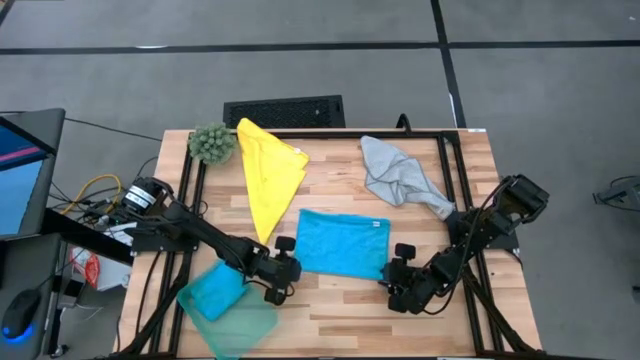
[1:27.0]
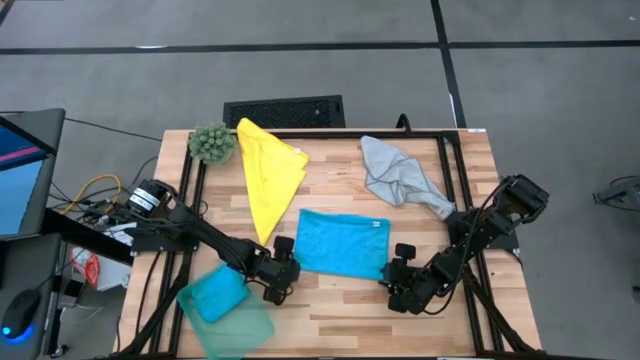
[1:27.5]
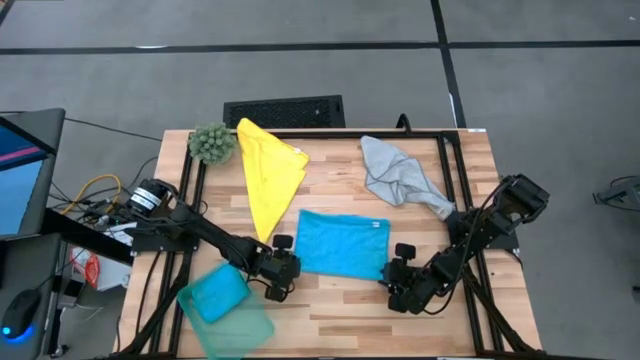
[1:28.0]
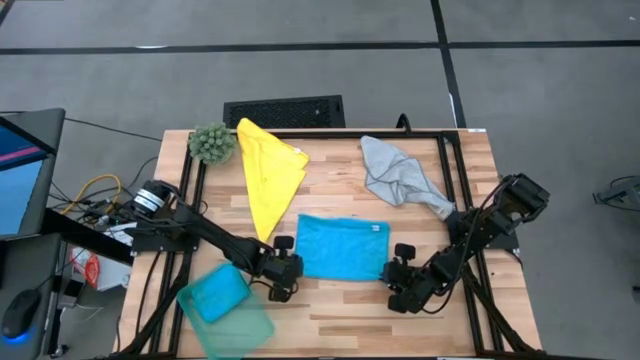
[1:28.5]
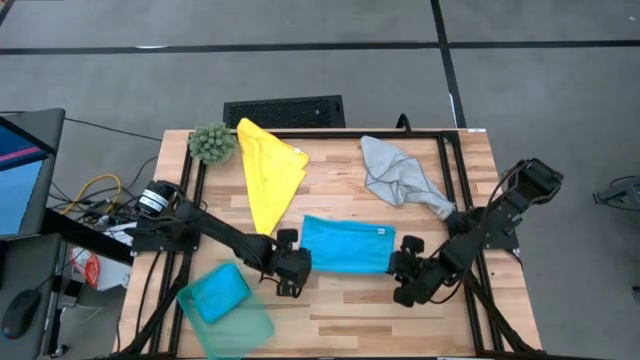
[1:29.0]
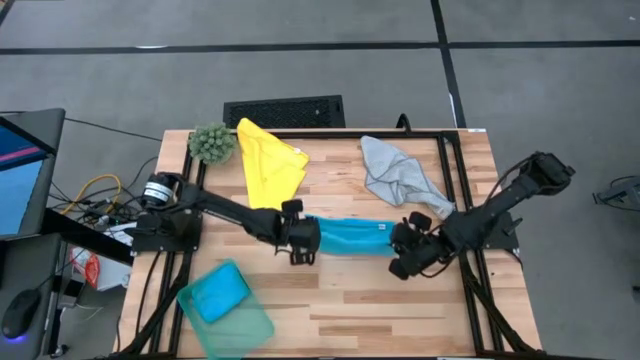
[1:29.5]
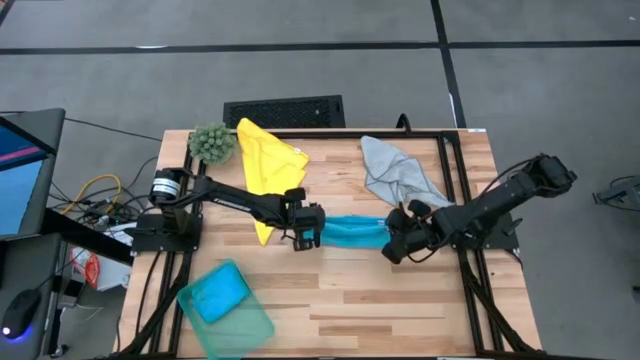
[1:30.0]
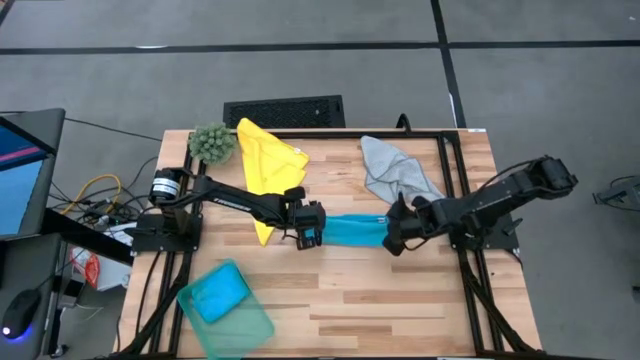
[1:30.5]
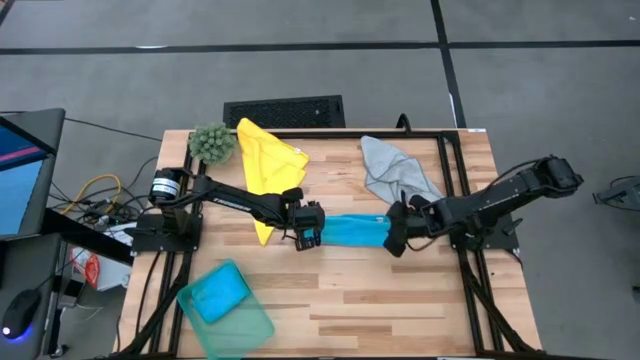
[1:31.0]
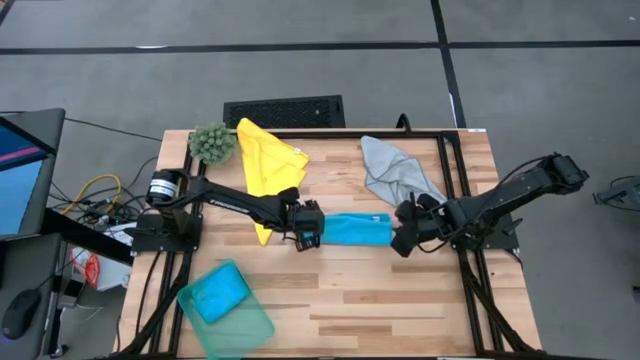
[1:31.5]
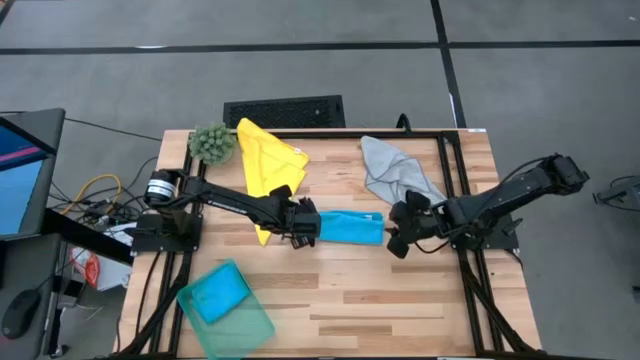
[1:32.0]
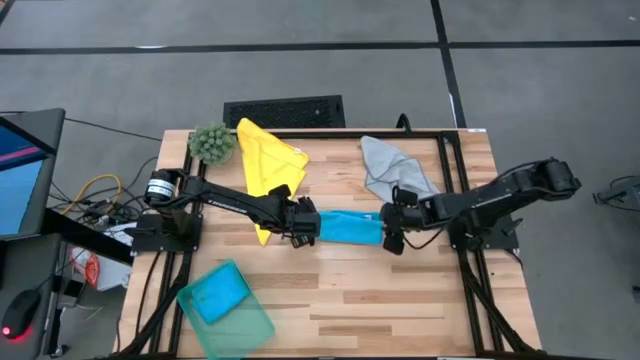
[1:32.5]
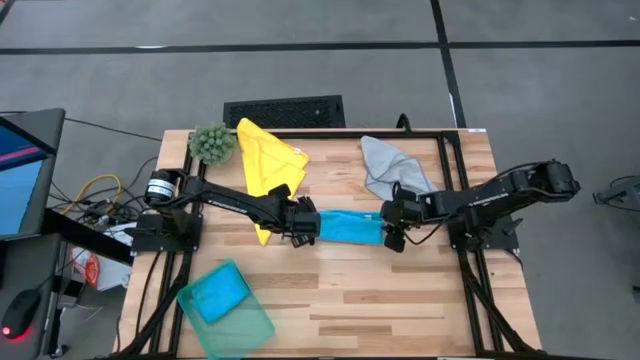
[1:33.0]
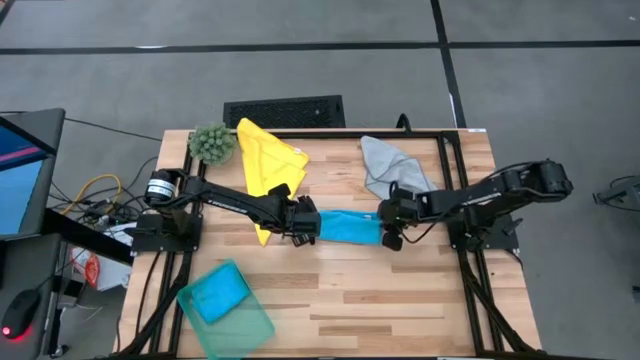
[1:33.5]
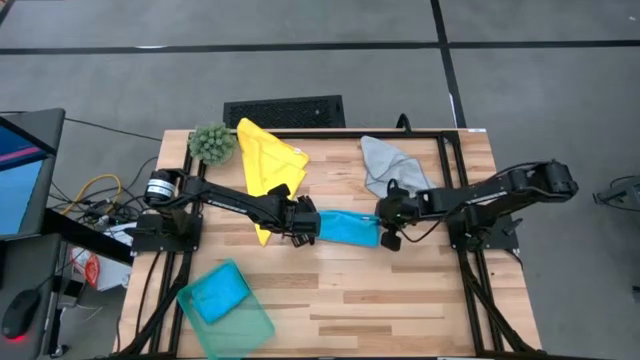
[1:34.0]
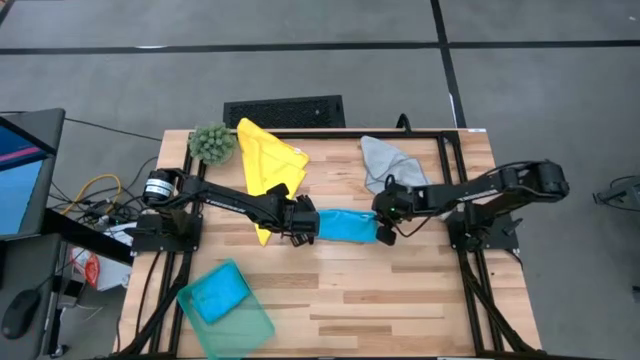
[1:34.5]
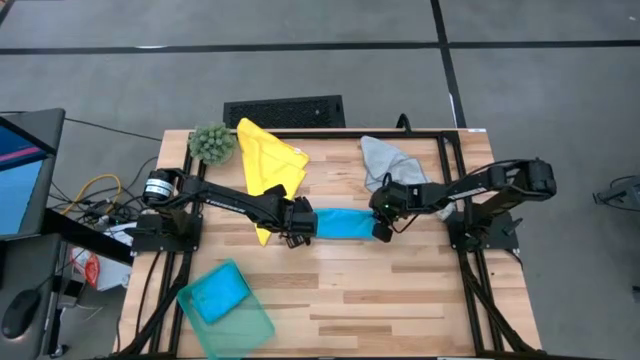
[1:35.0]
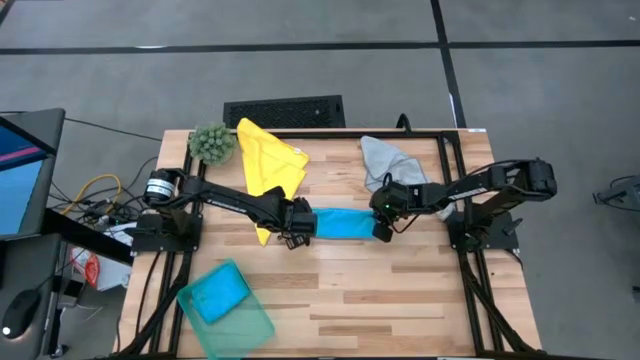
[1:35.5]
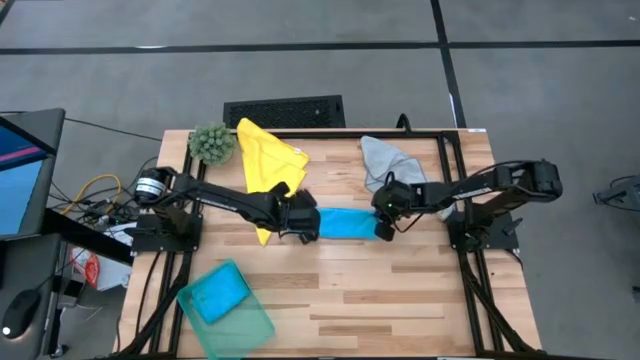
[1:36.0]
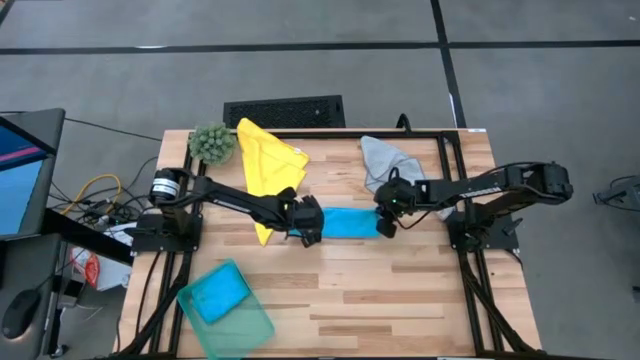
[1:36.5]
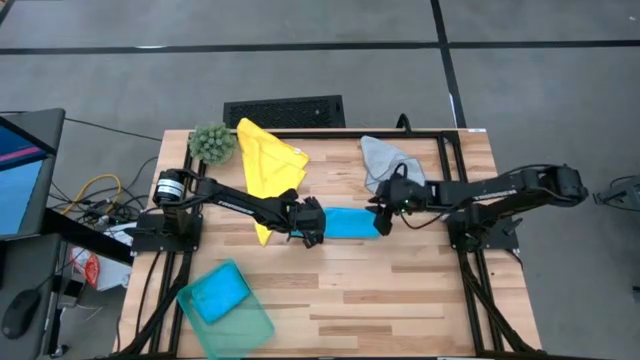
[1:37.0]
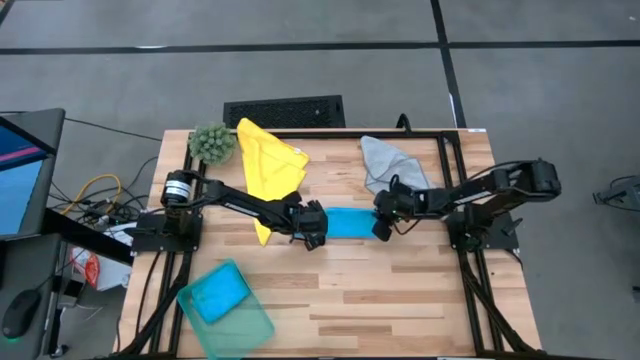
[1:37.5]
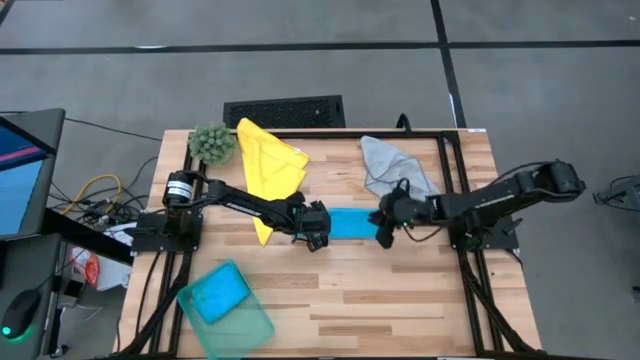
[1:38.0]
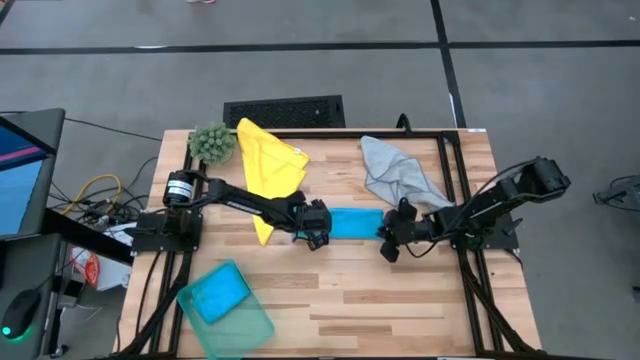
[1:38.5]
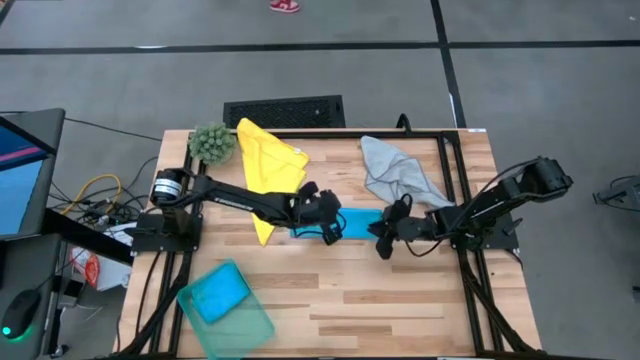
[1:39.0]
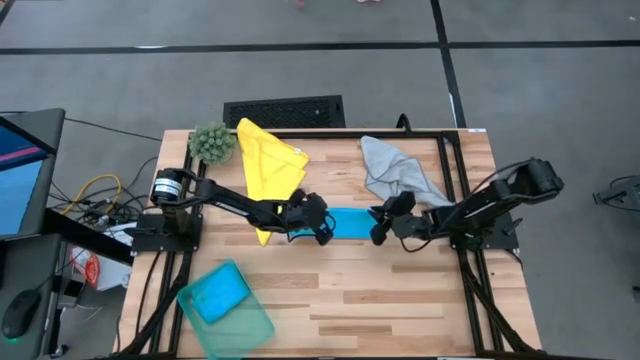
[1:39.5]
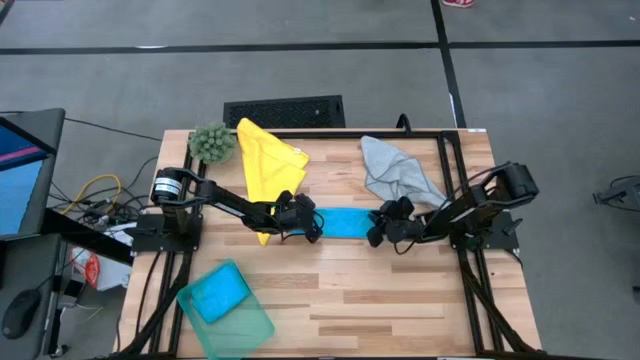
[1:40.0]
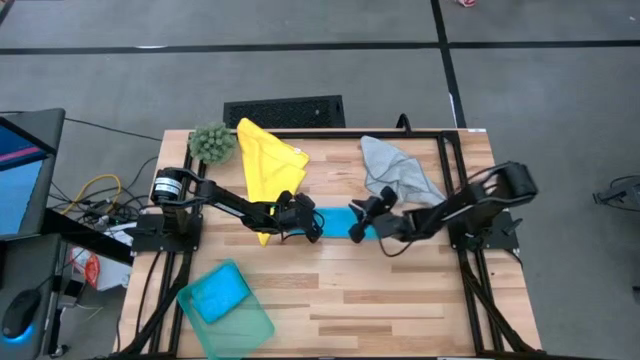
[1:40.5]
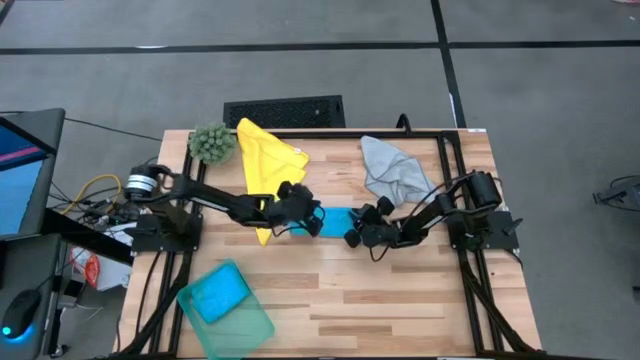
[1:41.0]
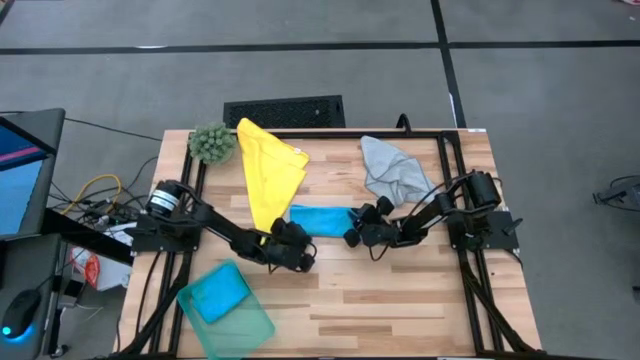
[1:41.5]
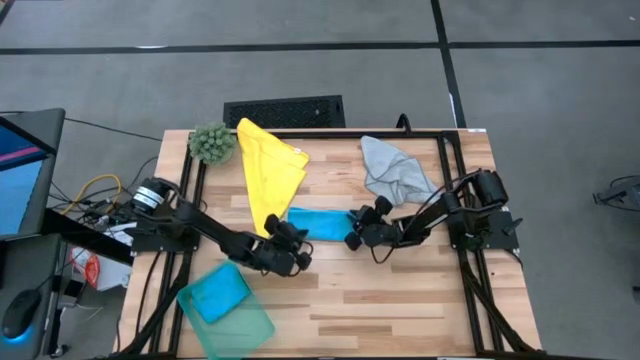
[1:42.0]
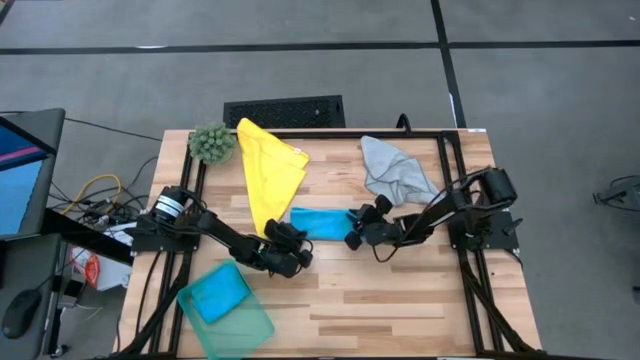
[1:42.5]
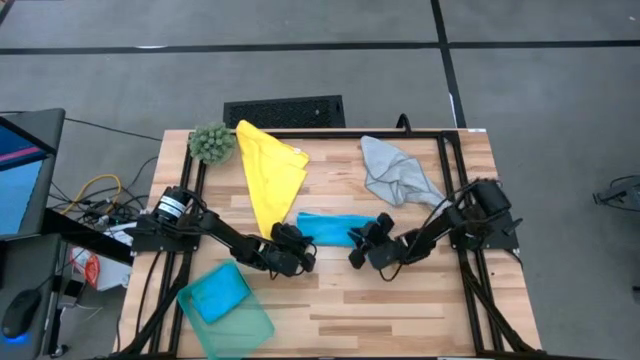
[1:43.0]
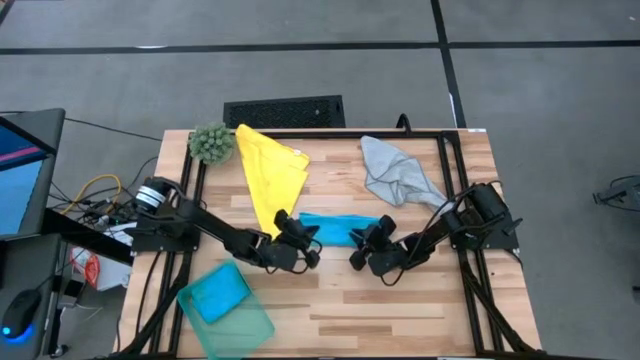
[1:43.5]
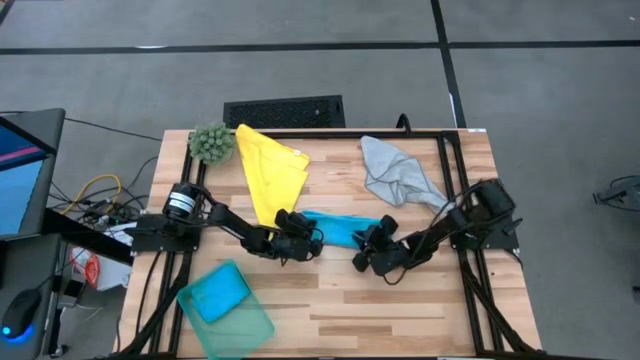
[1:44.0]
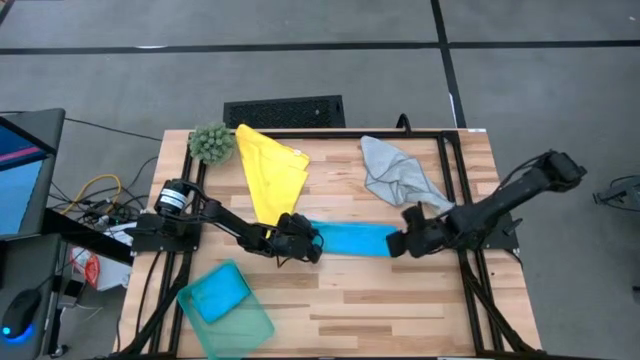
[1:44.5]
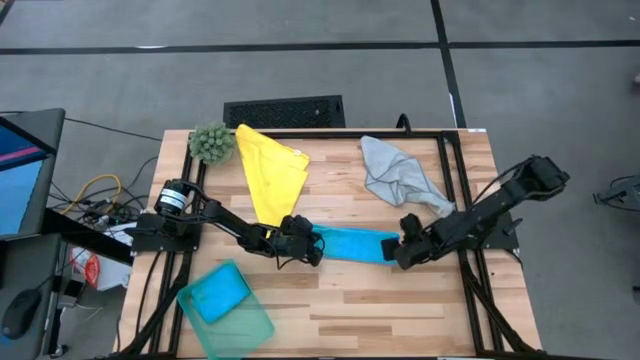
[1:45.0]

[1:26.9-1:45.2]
Task: Fold microfiber towels
Fold the blue towel

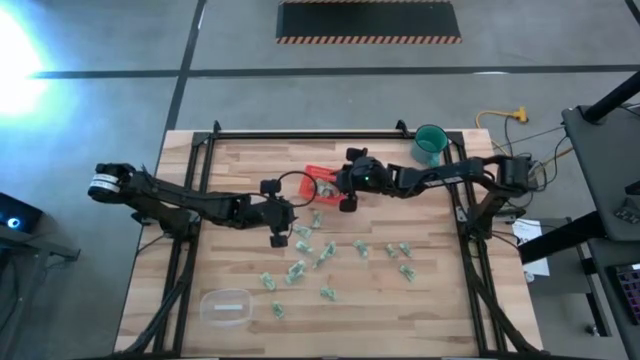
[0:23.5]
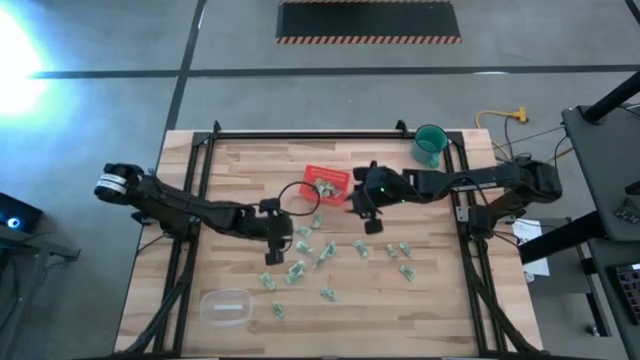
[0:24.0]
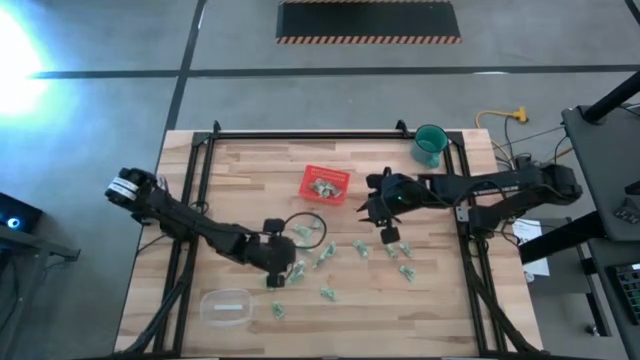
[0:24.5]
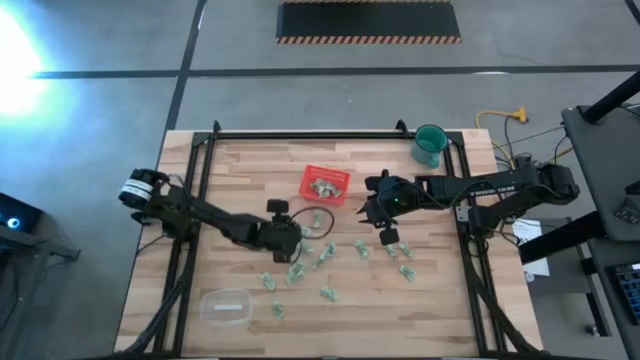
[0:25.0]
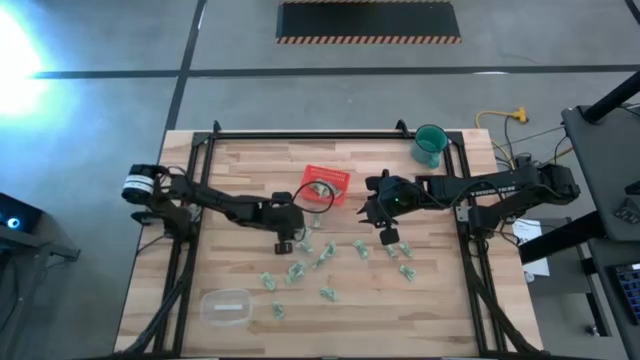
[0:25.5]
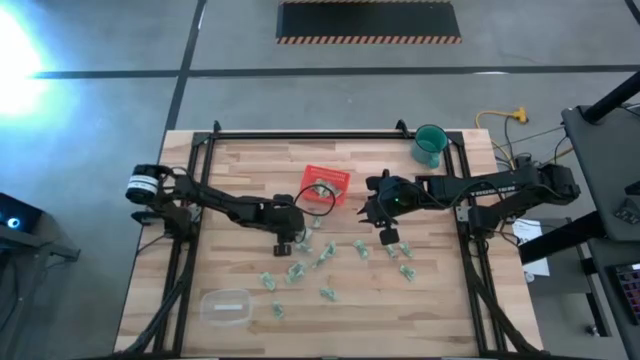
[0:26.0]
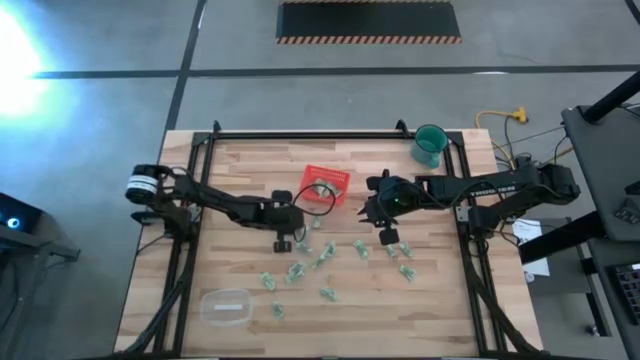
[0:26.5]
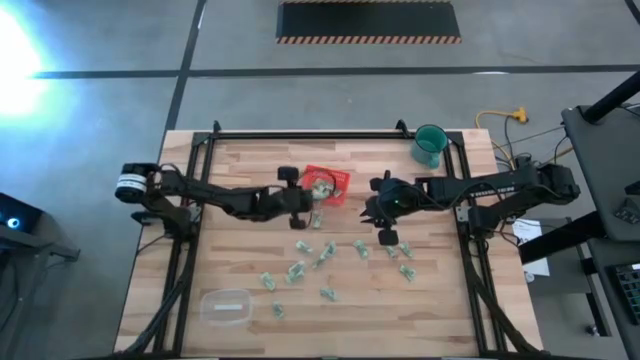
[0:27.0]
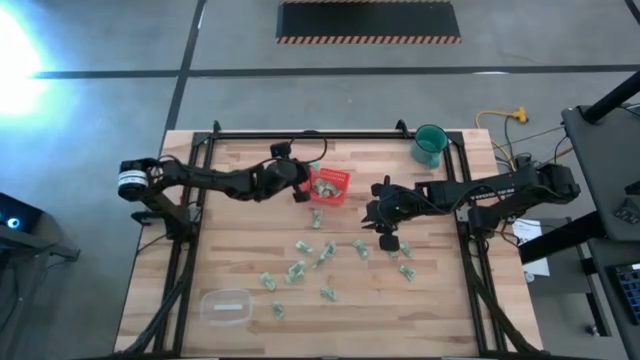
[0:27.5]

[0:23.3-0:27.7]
Task: Pick and place items into bin
Put the stevia packet into the orange bin
